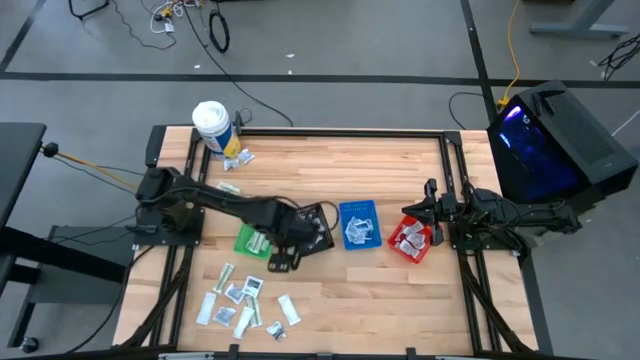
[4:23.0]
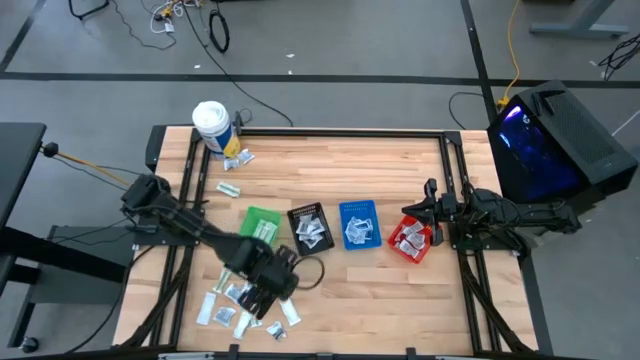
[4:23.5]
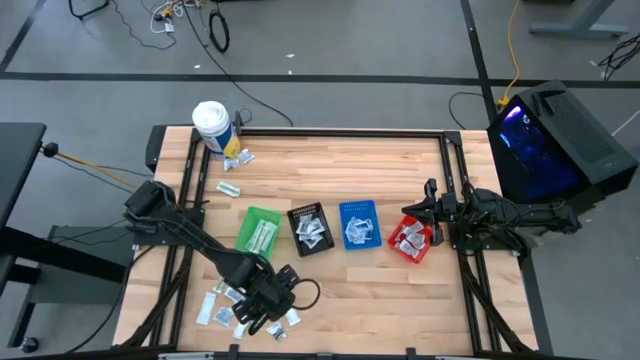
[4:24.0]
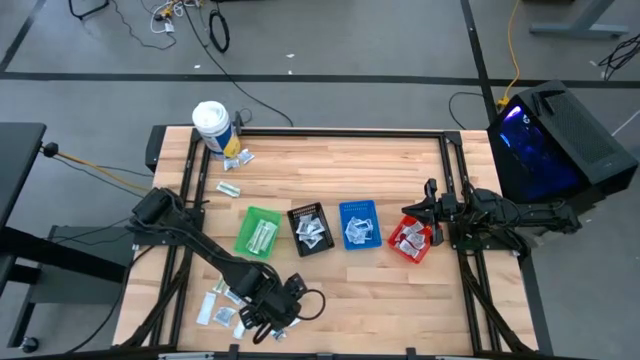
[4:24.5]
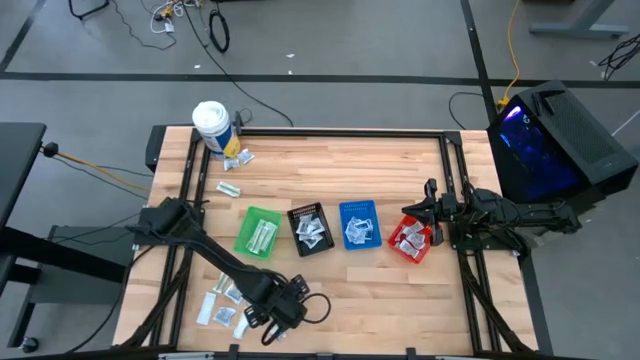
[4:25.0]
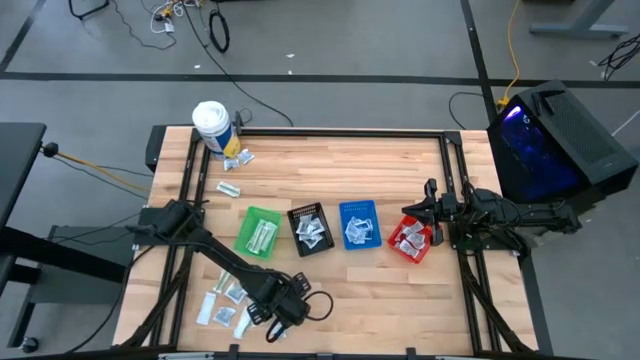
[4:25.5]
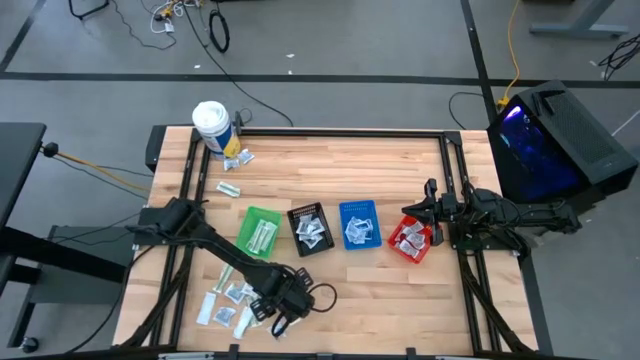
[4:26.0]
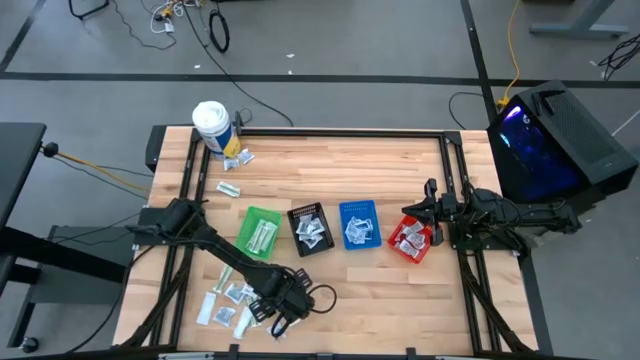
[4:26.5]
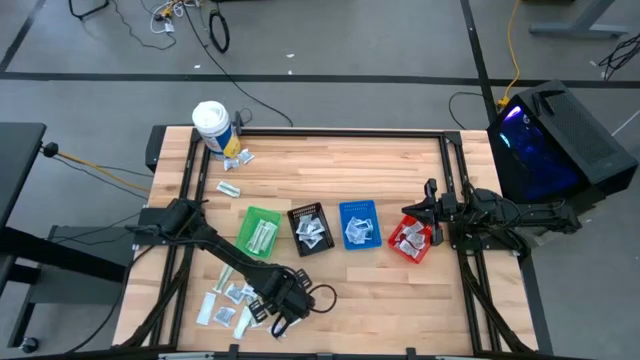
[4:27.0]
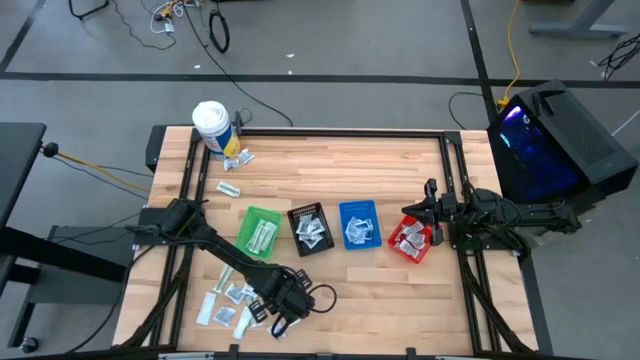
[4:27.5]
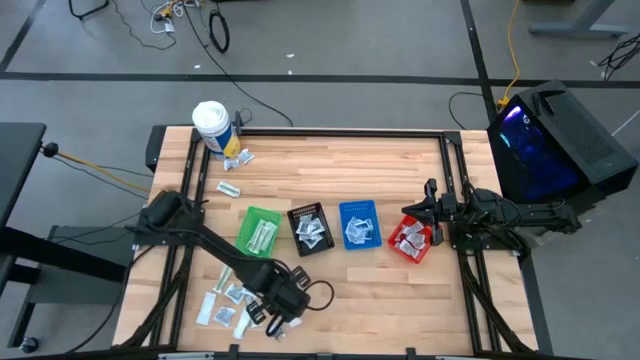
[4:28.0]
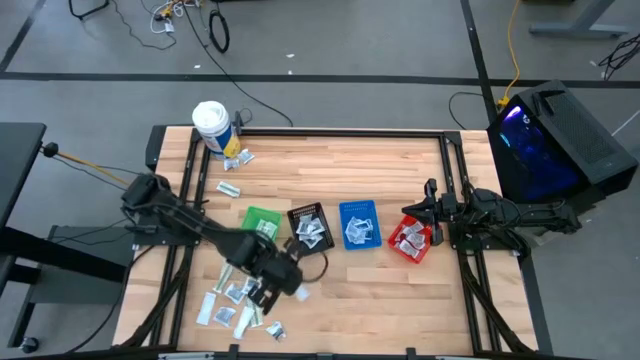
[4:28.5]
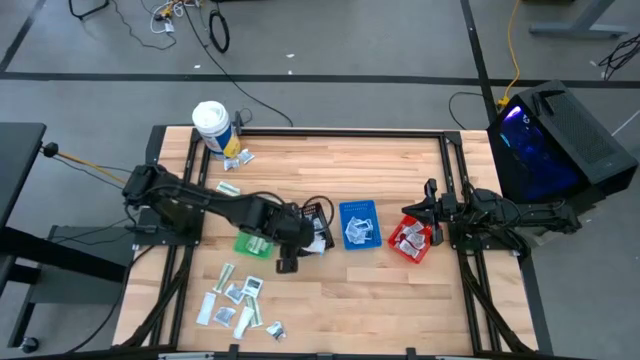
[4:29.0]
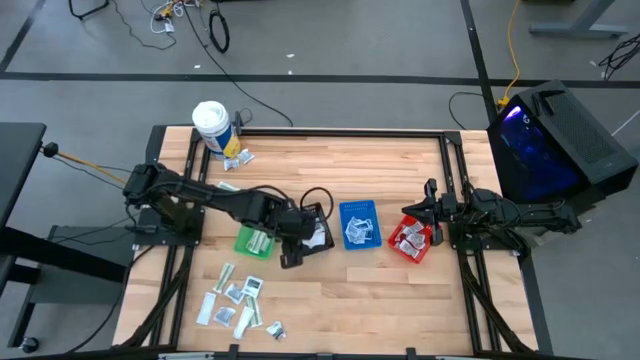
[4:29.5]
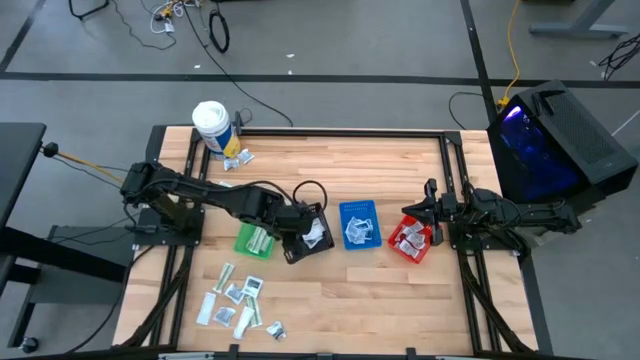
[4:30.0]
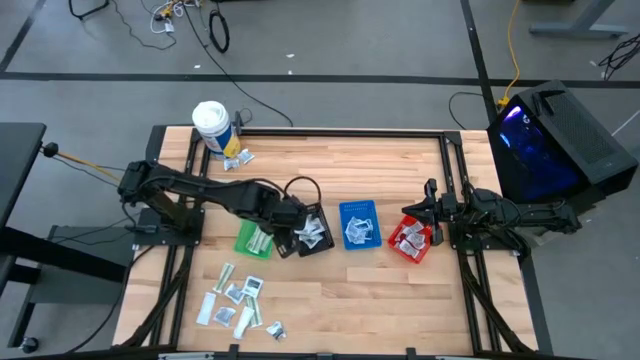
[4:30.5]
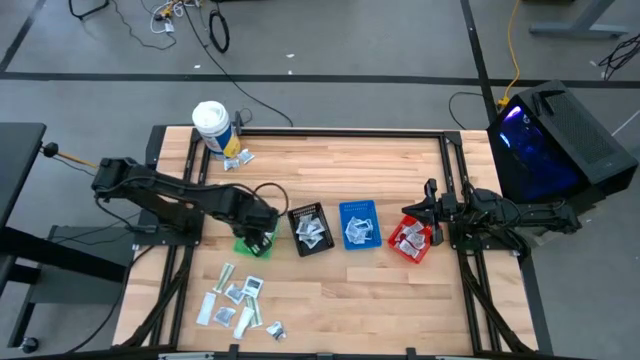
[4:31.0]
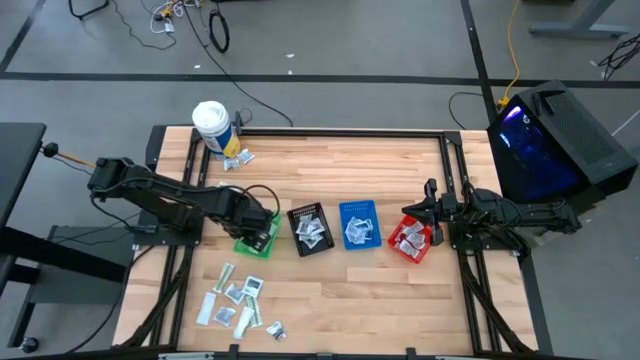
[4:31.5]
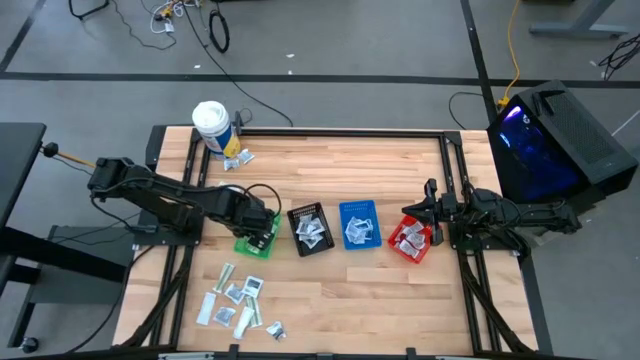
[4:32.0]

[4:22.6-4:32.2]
Task: Pick & Place First Aid Supplies
Put the bandage into the green basket

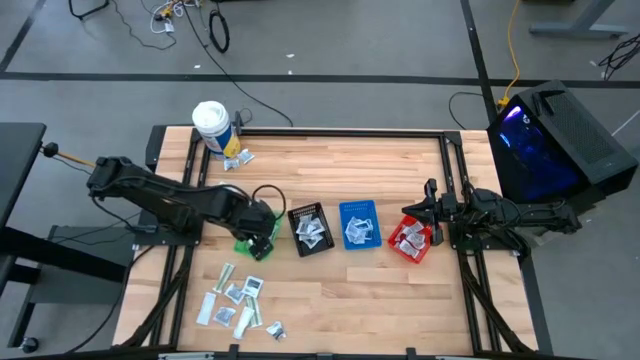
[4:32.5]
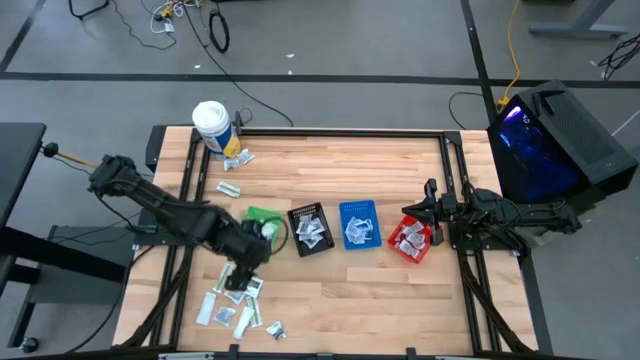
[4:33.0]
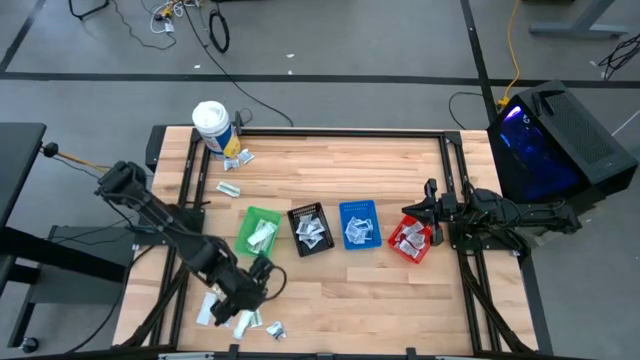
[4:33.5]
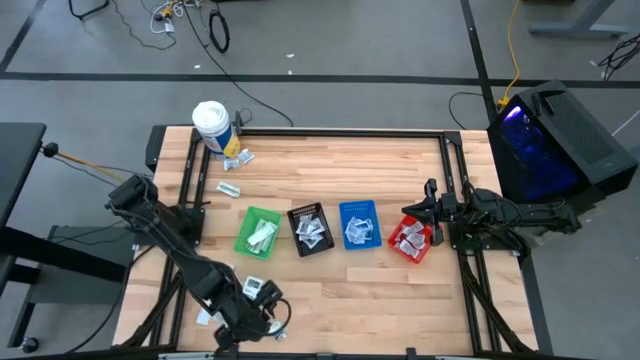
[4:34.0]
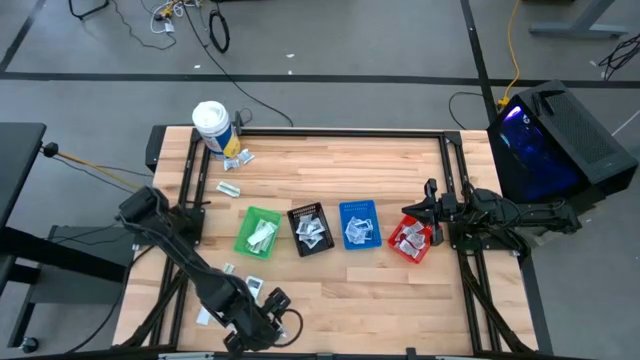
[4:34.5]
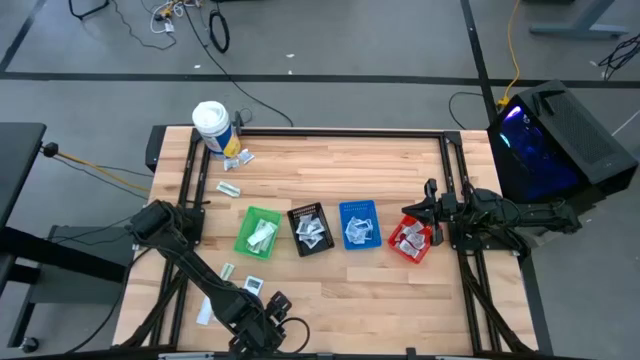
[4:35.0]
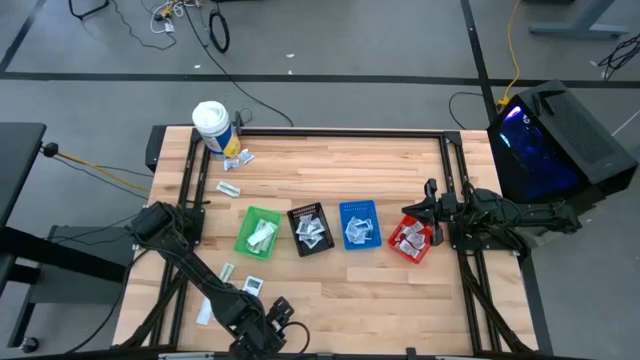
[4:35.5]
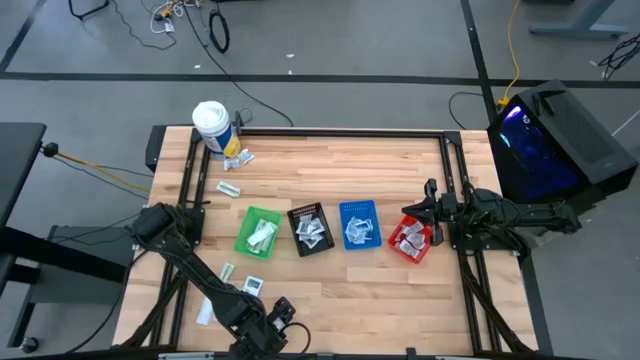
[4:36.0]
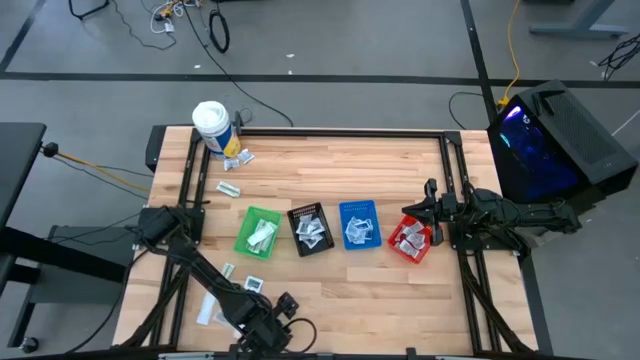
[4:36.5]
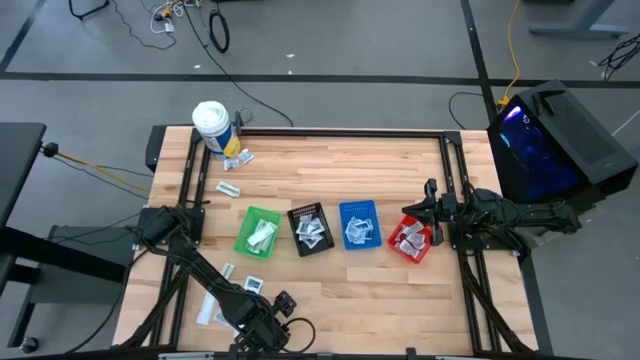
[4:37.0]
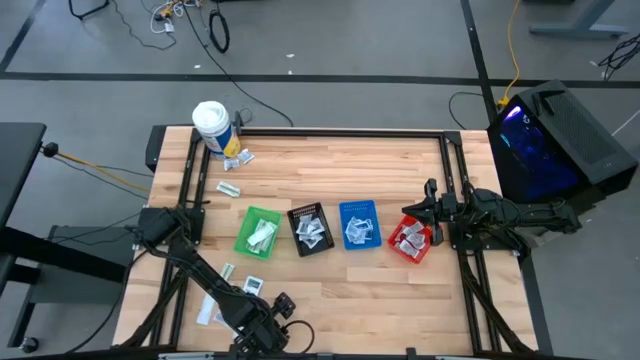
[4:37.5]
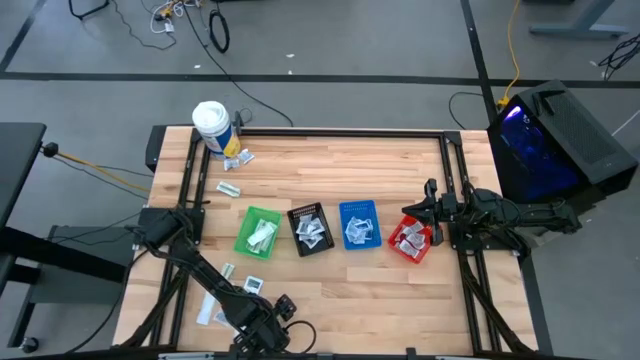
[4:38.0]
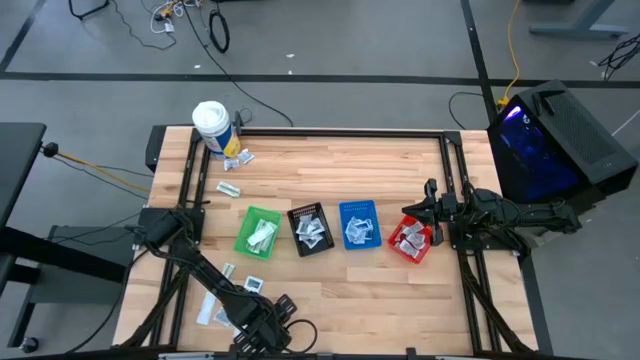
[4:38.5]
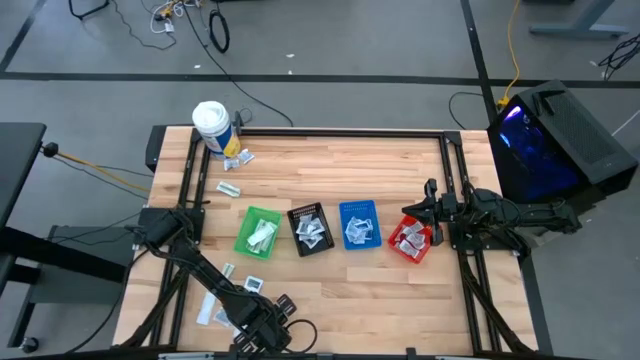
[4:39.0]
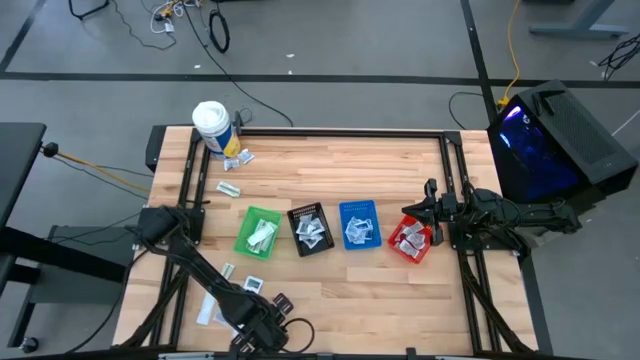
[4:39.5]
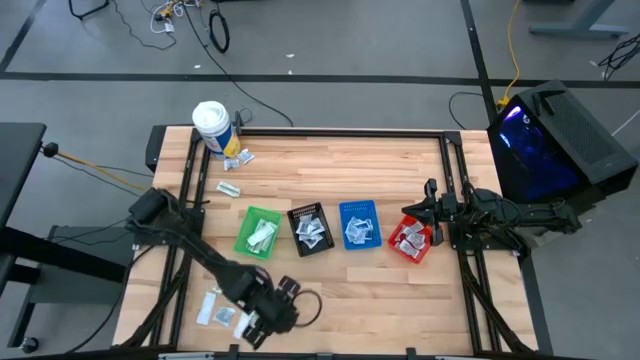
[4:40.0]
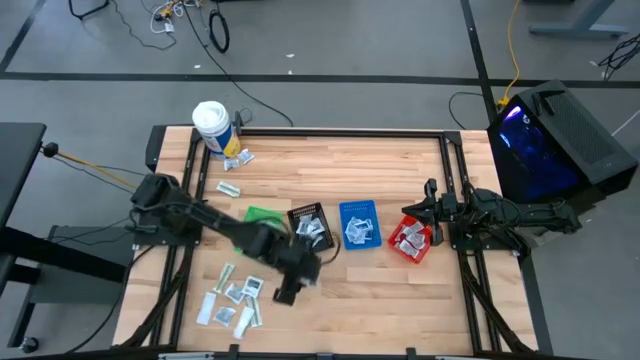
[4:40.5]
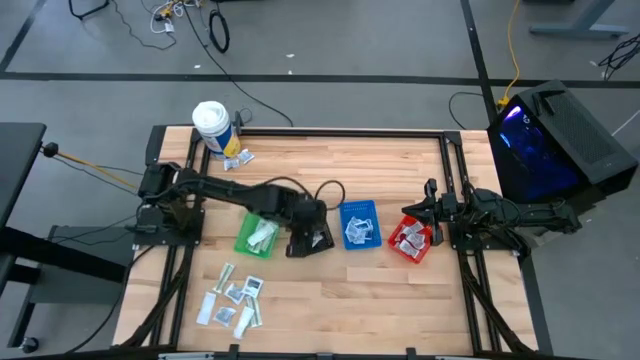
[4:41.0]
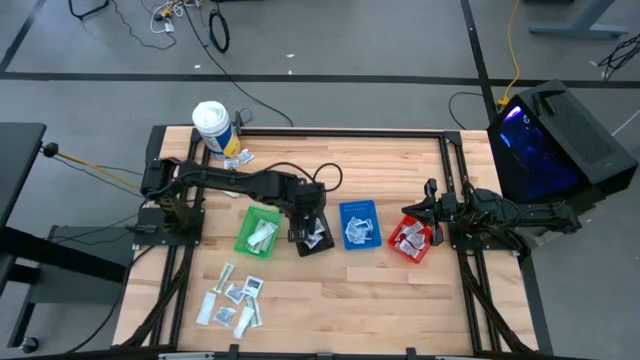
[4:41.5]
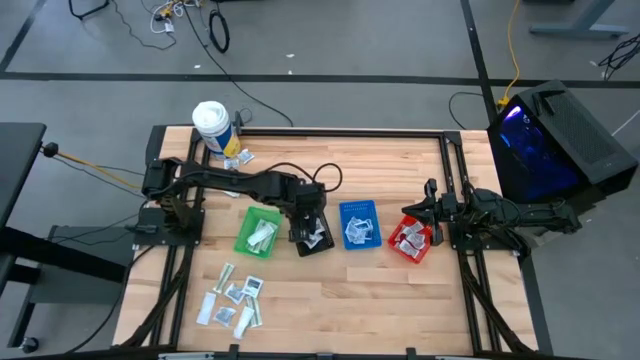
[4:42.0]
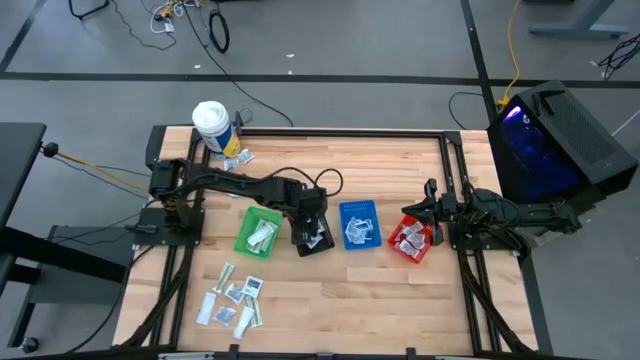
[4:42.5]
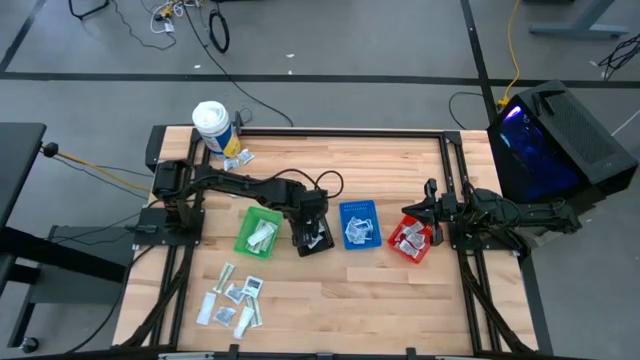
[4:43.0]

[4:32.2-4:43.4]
Put the towelette pack into the black basket
